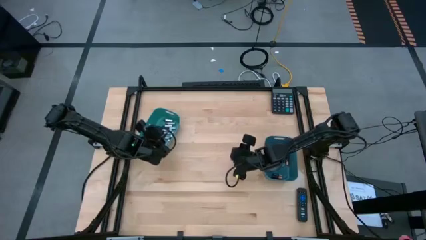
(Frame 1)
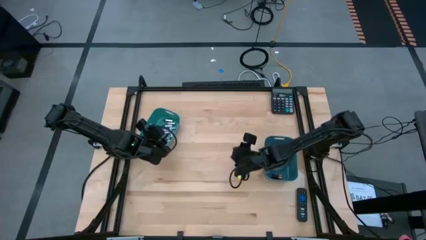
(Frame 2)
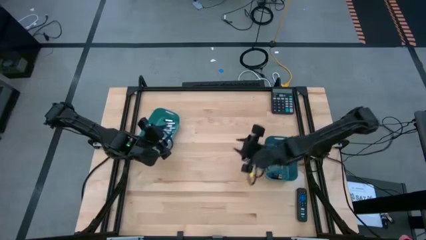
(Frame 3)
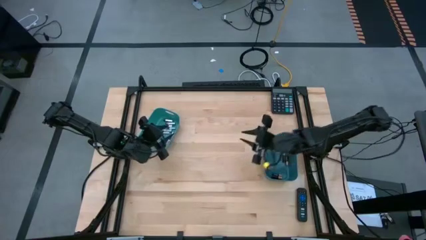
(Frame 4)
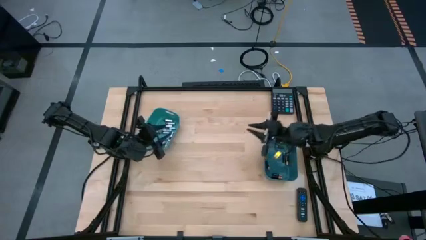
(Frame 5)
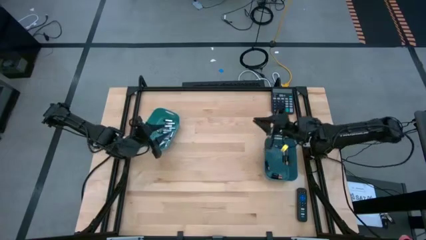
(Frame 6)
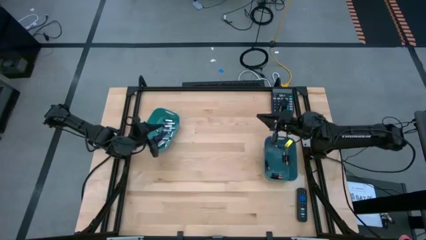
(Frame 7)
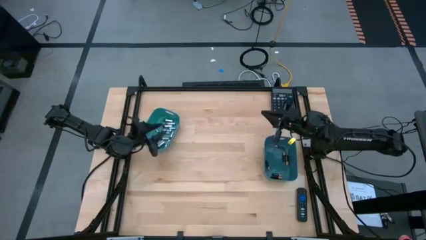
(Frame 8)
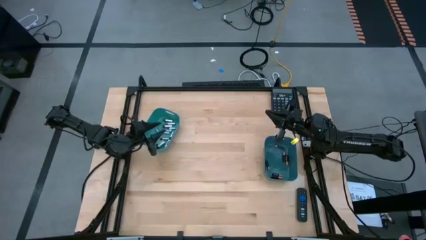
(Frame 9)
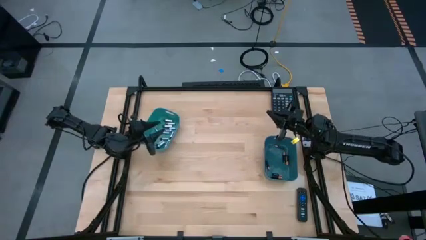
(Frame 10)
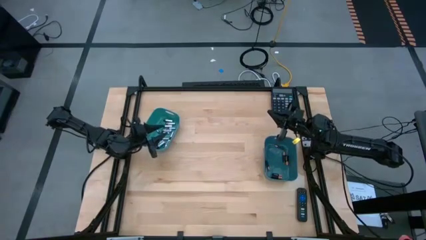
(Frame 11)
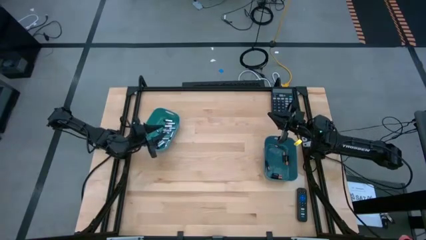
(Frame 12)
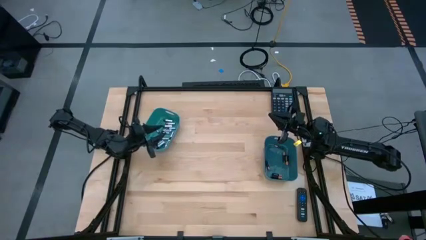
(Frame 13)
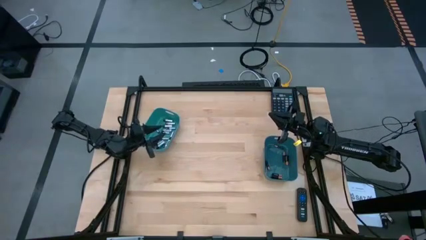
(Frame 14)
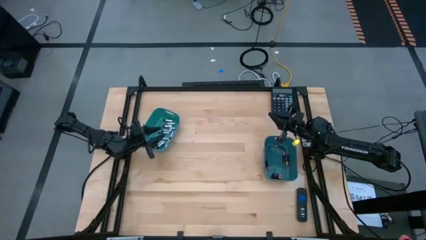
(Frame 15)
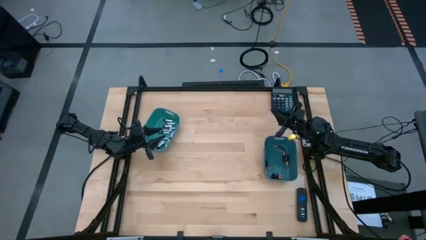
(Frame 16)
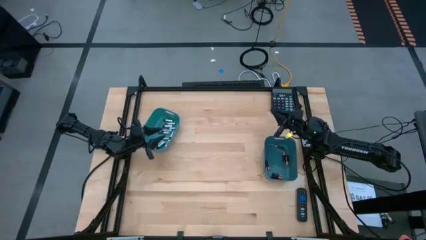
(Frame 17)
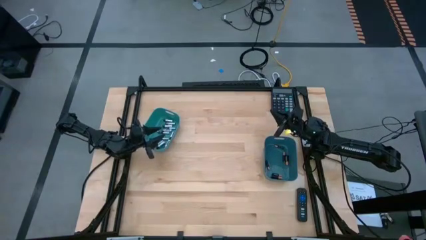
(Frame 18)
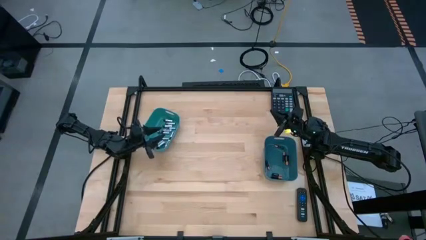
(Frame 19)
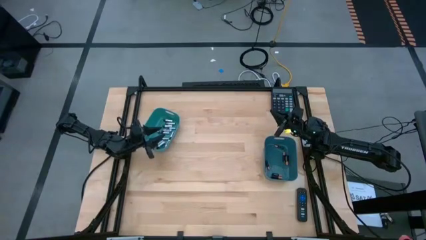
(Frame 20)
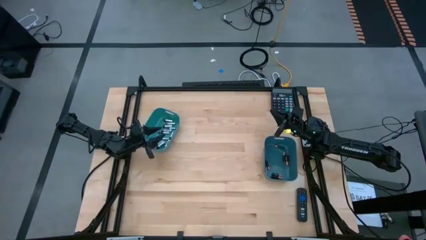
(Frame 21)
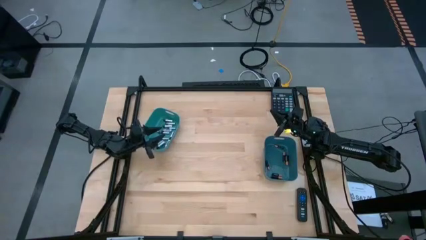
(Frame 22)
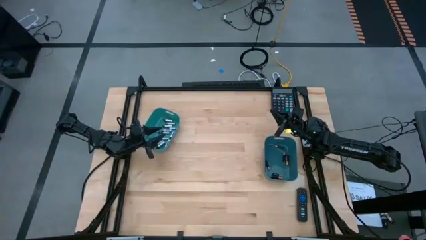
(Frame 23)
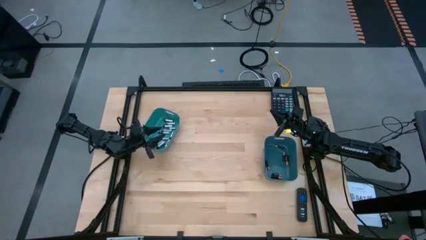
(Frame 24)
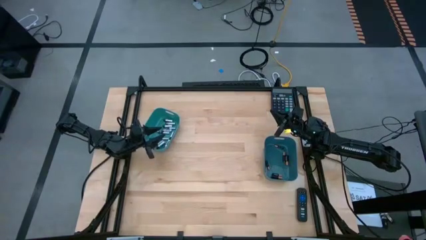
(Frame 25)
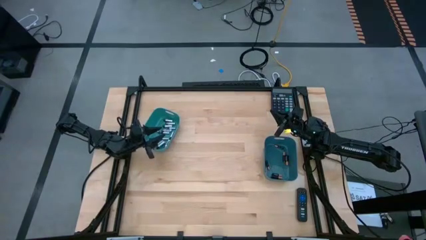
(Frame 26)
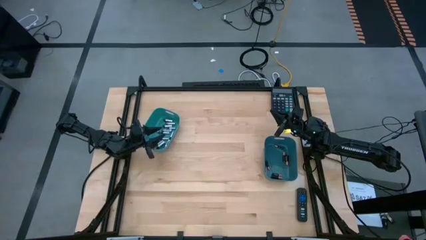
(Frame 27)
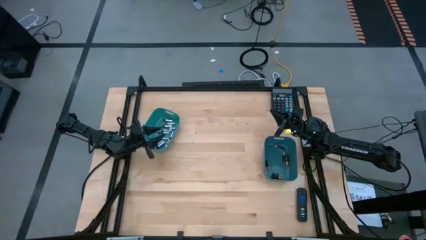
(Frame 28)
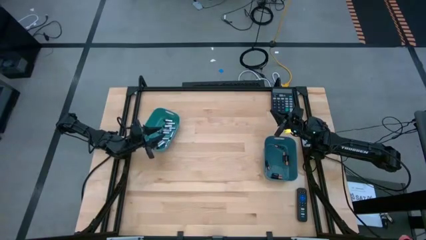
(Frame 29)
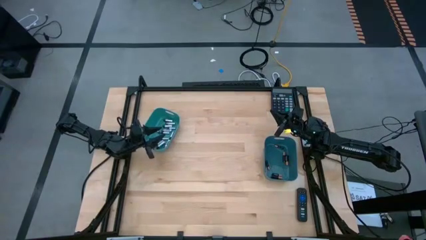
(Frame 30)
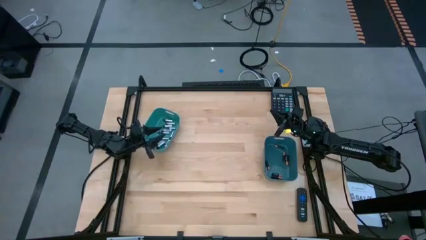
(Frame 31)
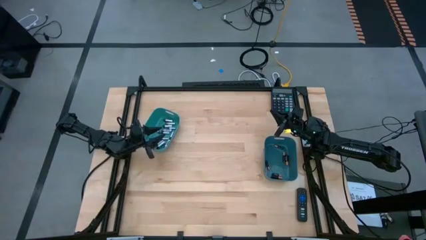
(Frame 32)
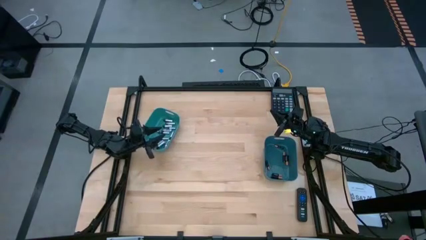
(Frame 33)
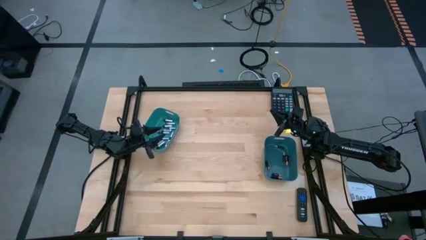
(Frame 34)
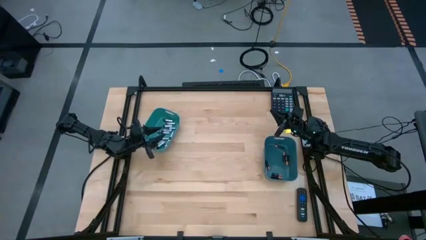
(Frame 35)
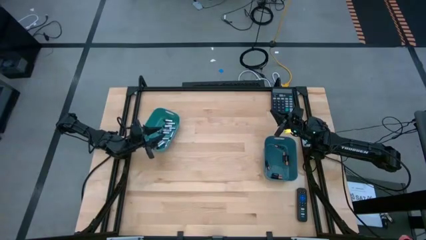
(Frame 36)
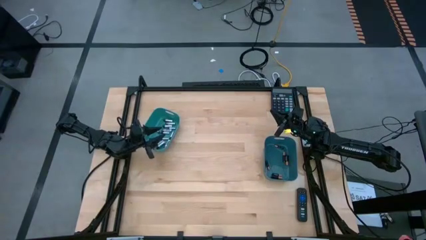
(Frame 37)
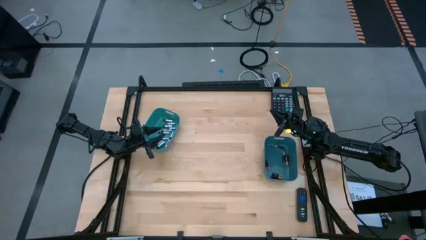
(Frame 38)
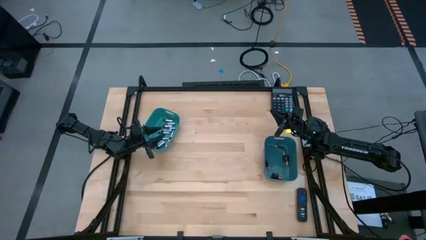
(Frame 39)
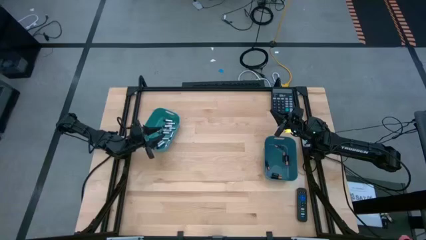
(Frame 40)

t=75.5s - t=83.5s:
Task: Sort batteries
Return to Home Position

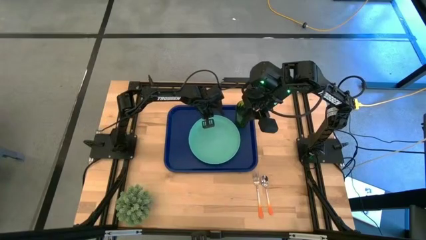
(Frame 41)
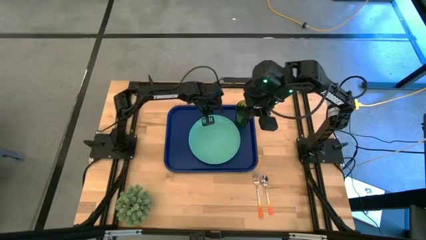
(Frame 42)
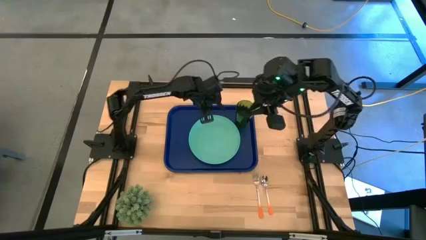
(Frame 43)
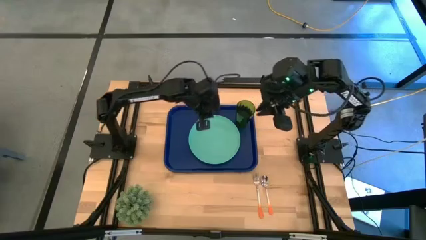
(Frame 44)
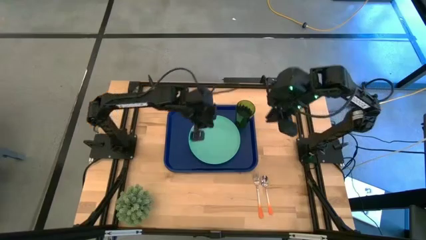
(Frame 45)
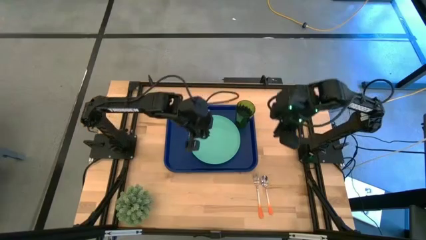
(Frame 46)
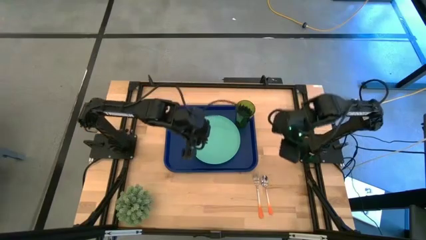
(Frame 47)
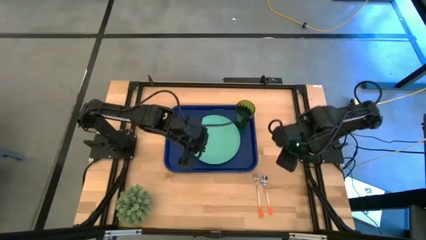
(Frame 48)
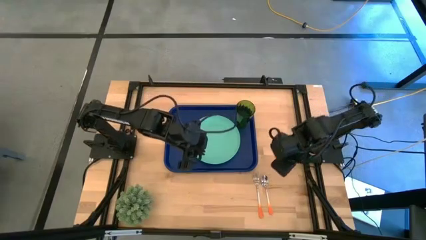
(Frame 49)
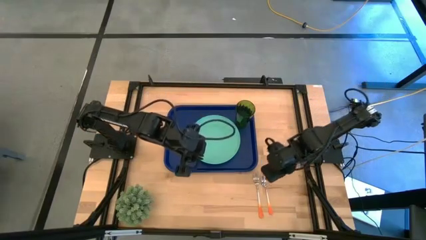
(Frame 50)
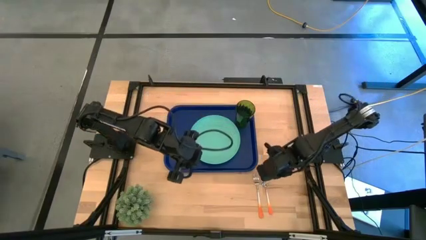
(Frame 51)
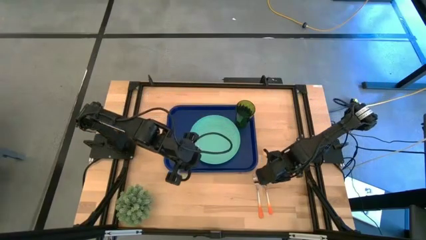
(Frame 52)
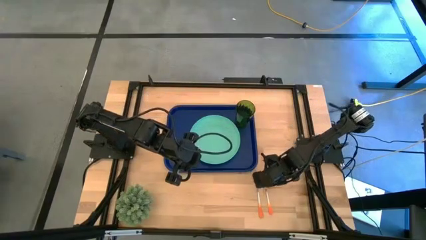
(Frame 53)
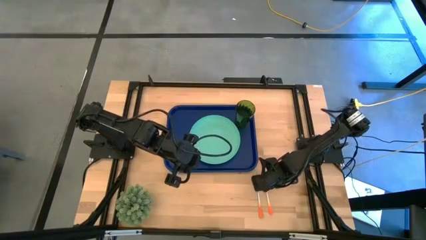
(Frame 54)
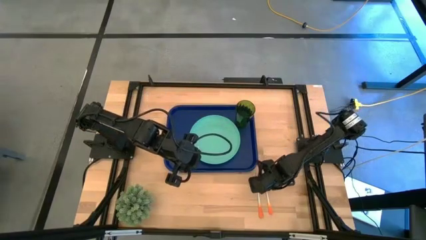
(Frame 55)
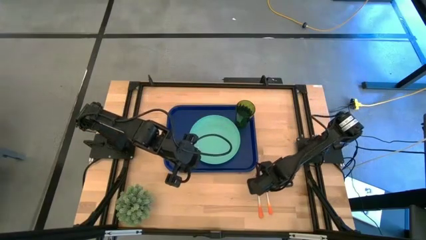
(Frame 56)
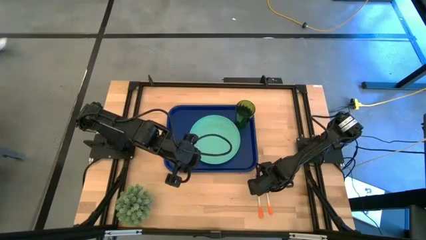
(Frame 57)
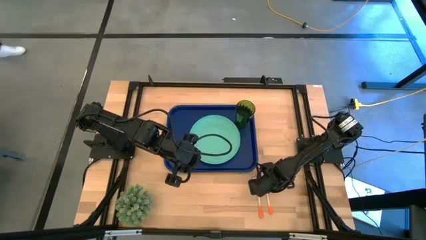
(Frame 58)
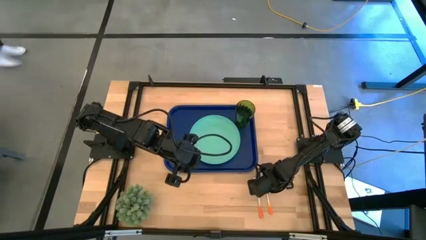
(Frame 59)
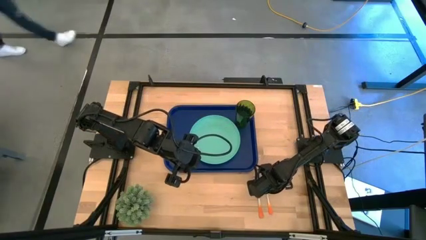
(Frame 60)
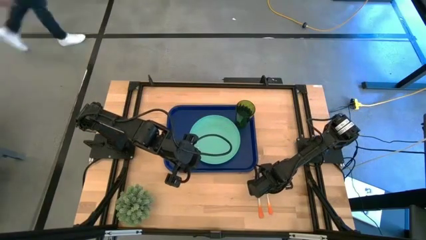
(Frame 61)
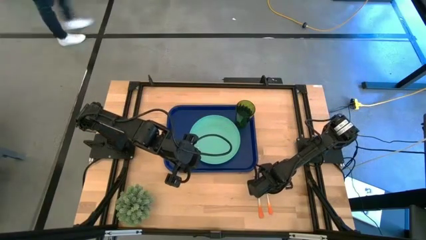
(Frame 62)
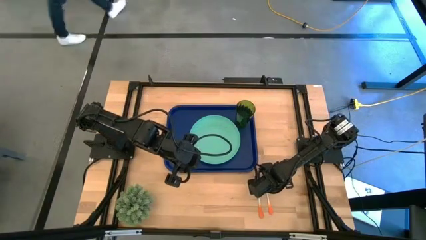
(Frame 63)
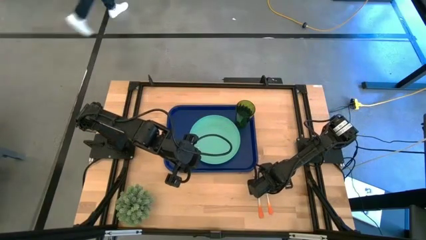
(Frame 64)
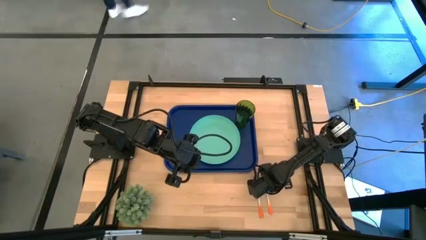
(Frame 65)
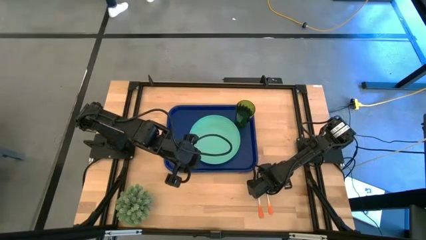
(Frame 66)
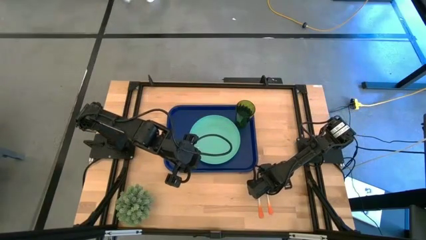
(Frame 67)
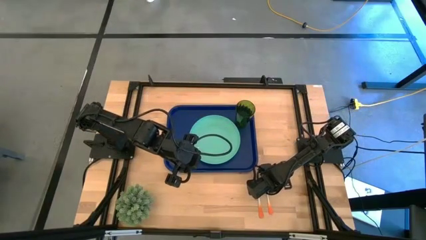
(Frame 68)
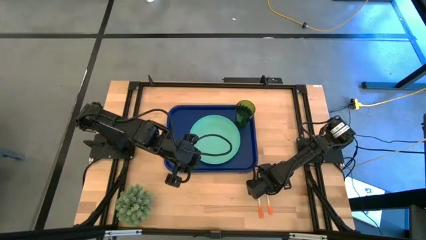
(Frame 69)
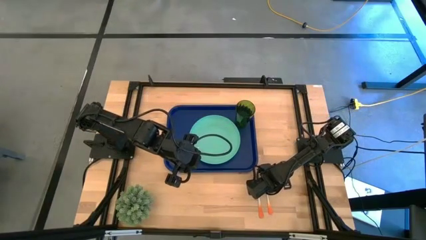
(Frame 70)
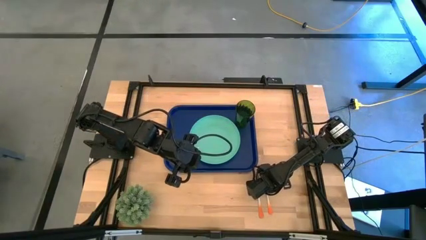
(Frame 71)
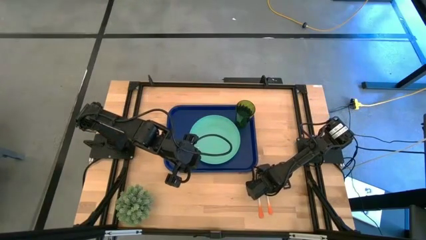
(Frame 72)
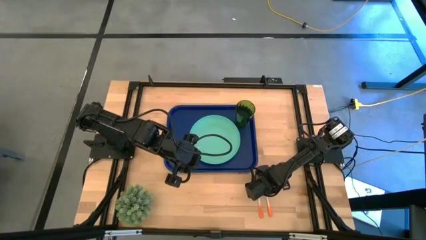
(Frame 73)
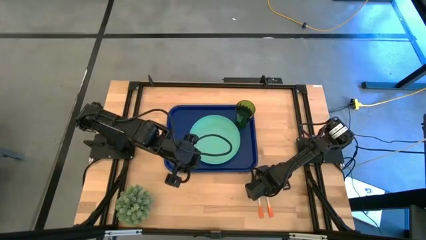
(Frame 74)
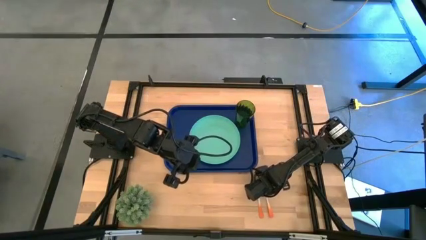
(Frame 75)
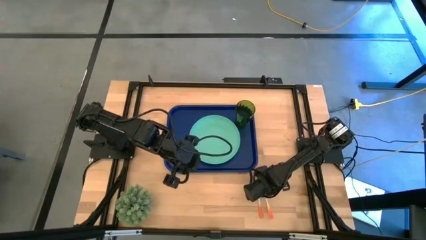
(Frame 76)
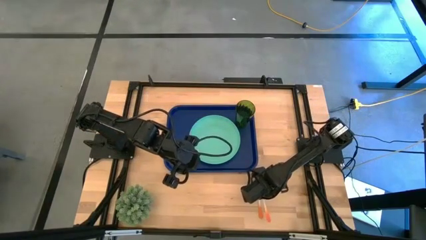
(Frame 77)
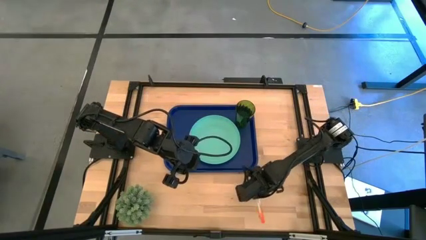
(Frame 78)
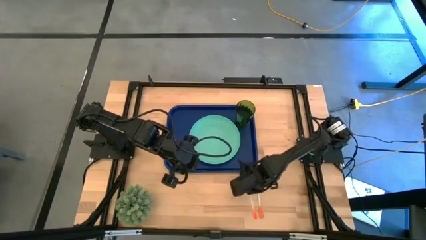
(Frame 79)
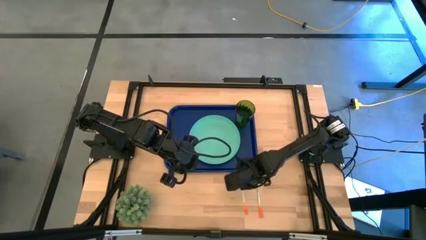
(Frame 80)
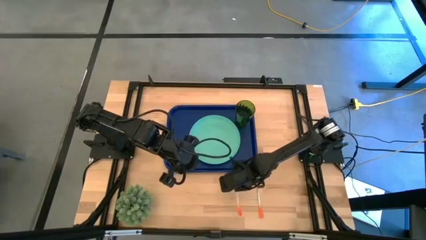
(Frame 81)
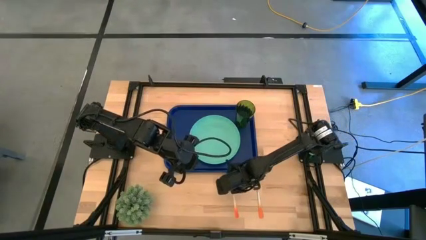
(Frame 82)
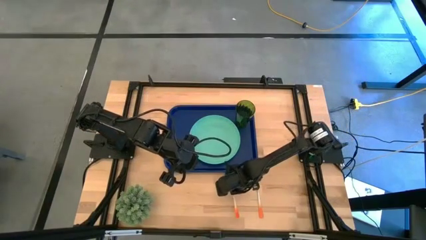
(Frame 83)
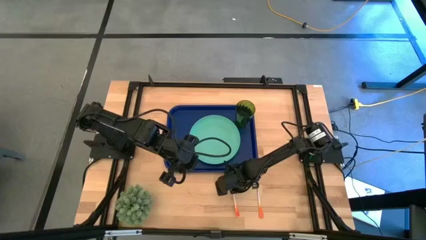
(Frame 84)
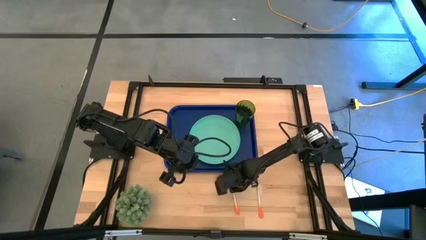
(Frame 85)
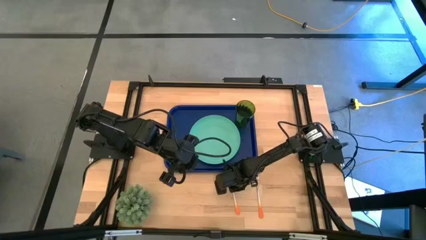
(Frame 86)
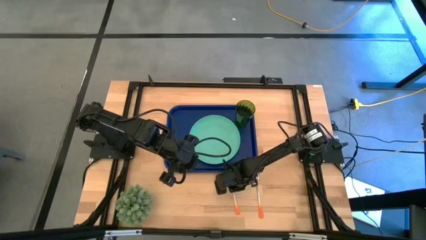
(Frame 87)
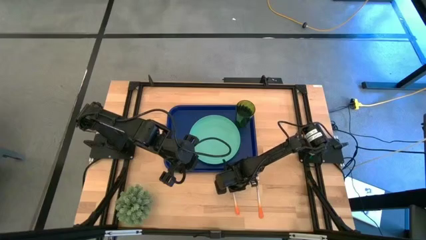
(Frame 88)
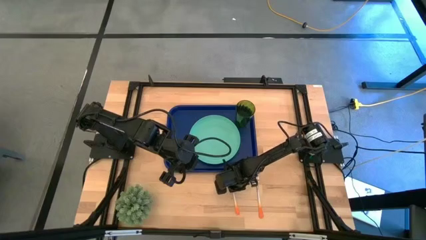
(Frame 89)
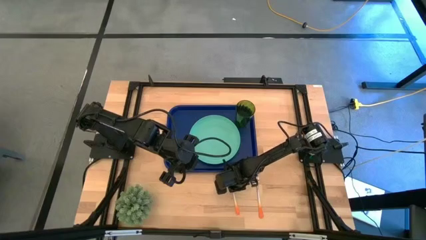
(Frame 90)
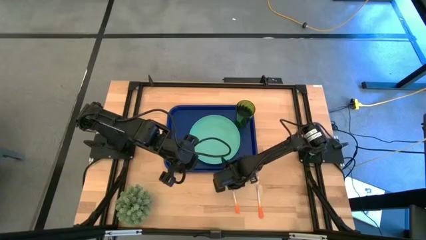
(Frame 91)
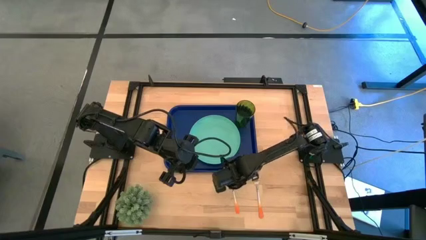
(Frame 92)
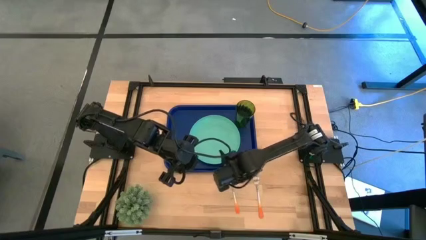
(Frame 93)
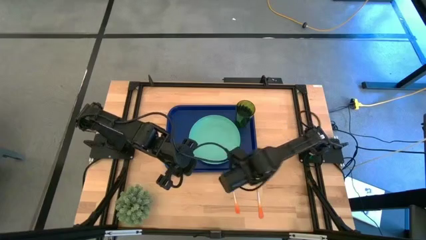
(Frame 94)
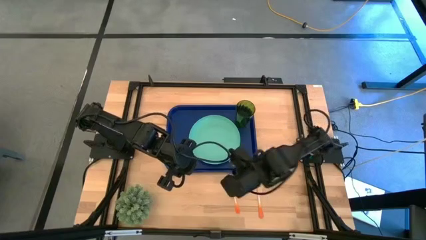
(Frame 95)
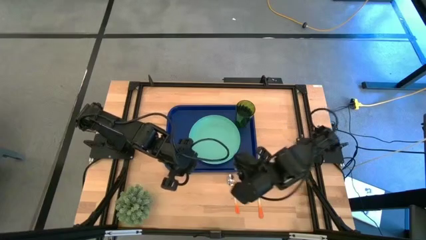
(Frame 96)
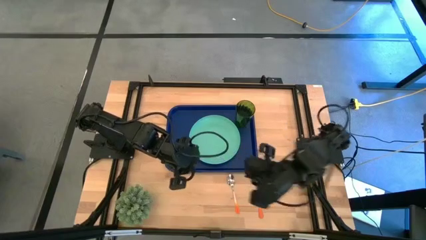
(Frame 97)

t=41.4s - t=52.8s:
Task: Pick and place plate/cup/fork/spoon on tray
Put the orange spoon to the blue serving tray to the left side of the green plate
